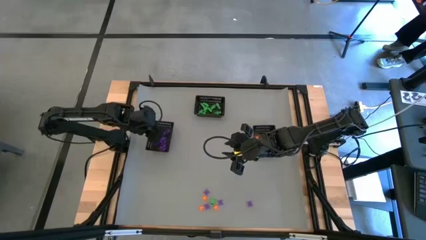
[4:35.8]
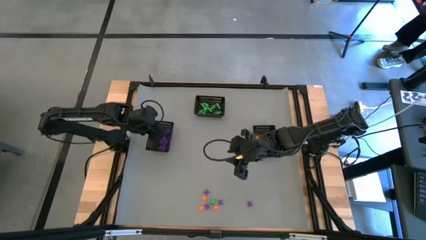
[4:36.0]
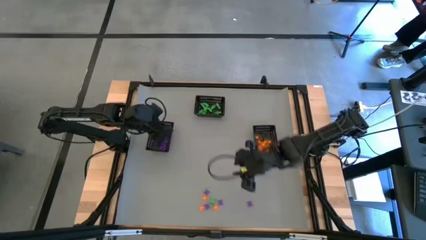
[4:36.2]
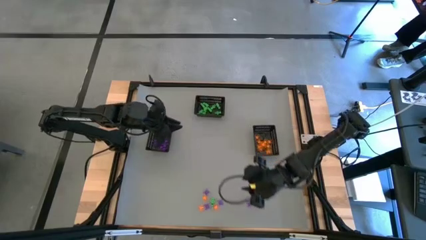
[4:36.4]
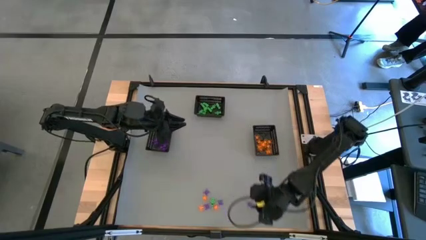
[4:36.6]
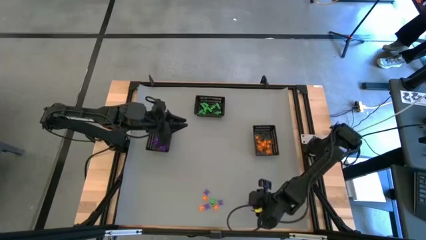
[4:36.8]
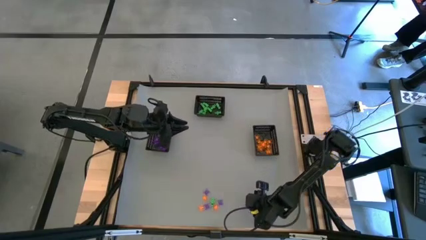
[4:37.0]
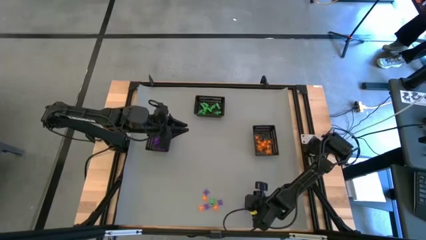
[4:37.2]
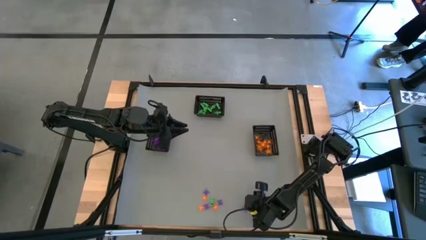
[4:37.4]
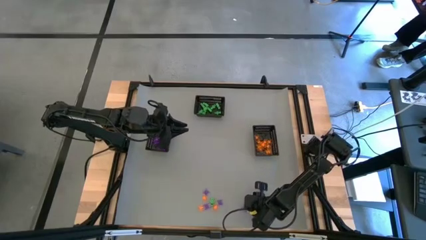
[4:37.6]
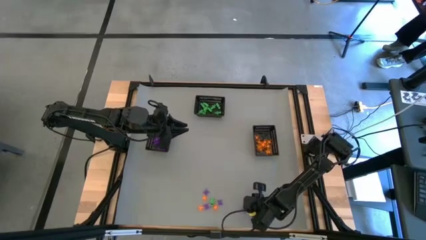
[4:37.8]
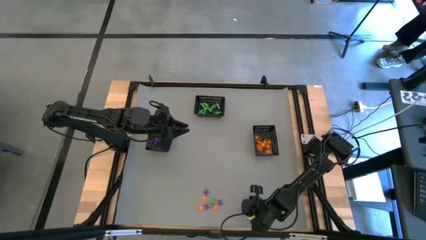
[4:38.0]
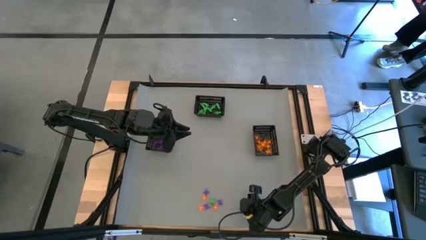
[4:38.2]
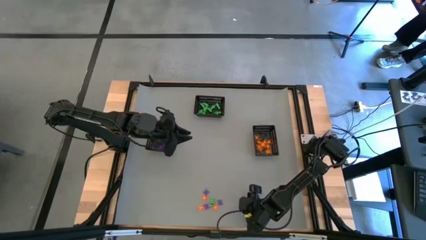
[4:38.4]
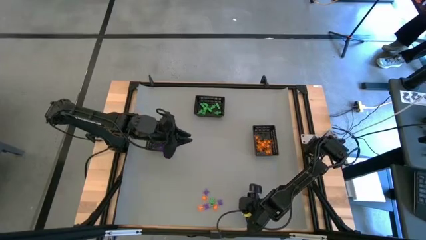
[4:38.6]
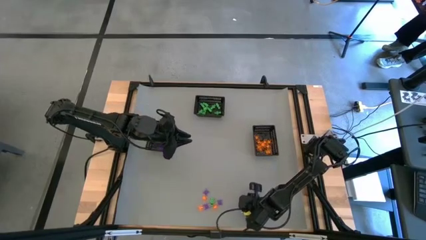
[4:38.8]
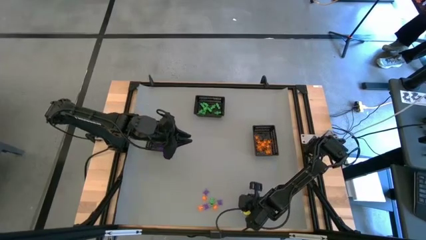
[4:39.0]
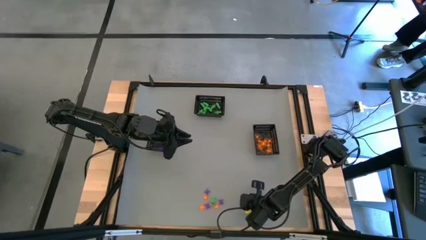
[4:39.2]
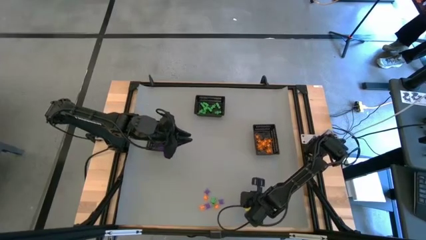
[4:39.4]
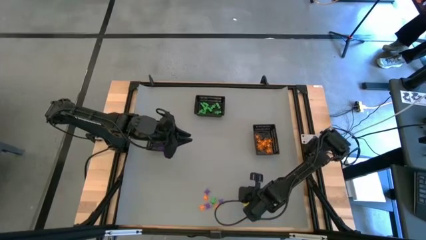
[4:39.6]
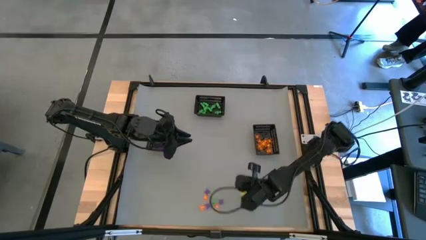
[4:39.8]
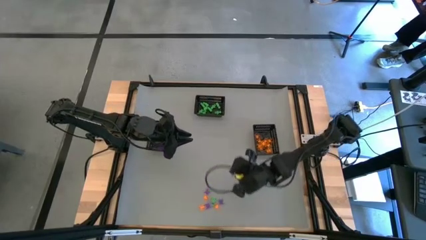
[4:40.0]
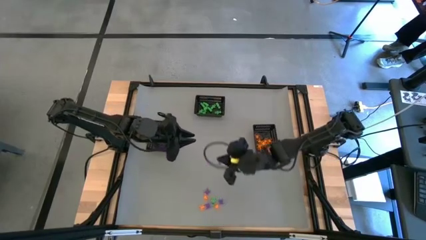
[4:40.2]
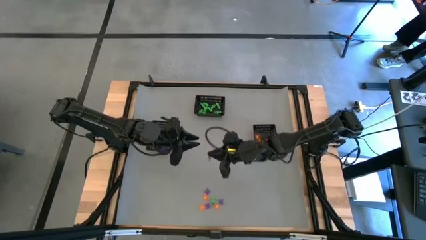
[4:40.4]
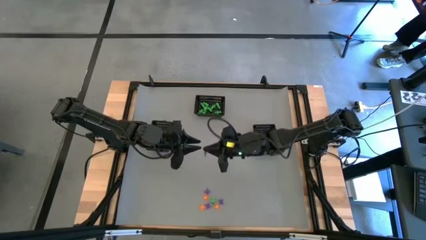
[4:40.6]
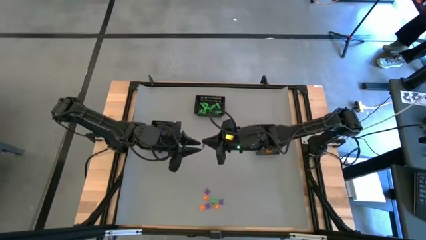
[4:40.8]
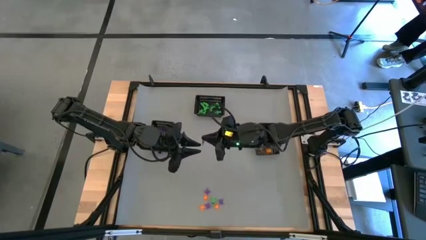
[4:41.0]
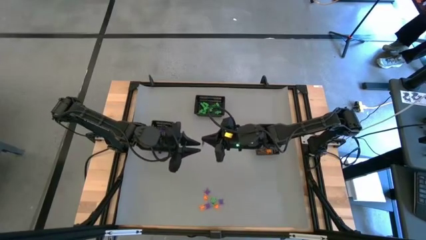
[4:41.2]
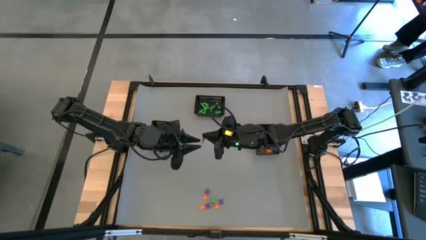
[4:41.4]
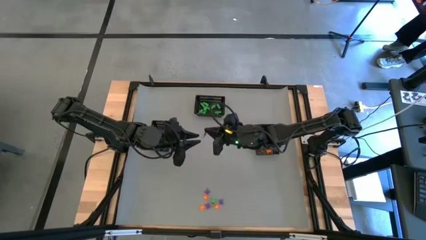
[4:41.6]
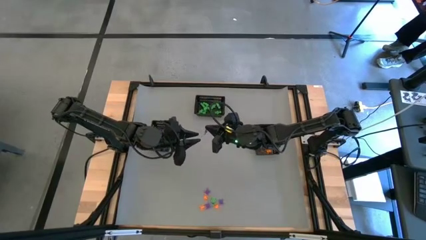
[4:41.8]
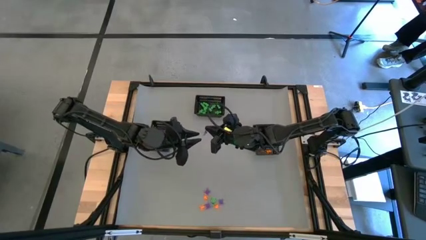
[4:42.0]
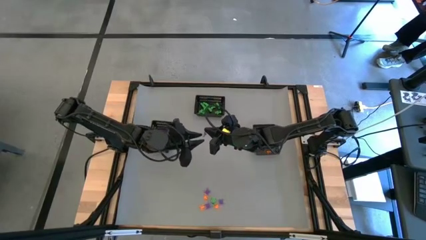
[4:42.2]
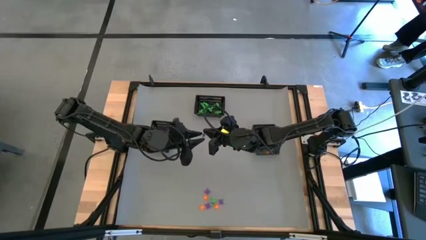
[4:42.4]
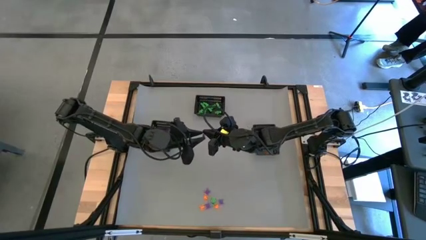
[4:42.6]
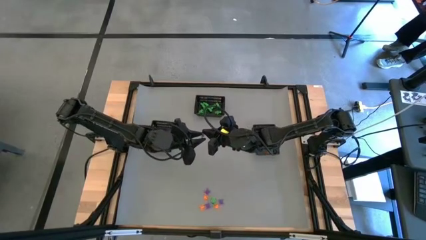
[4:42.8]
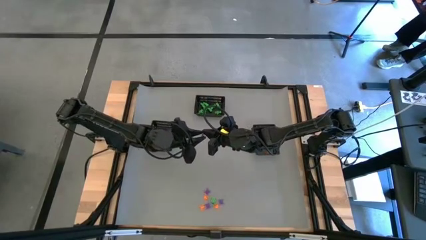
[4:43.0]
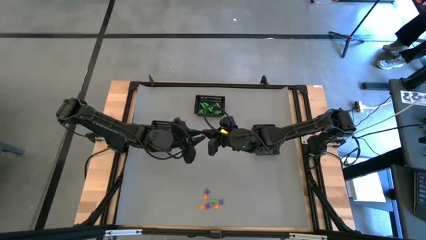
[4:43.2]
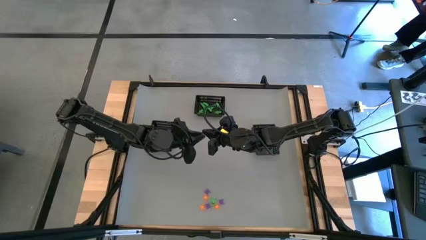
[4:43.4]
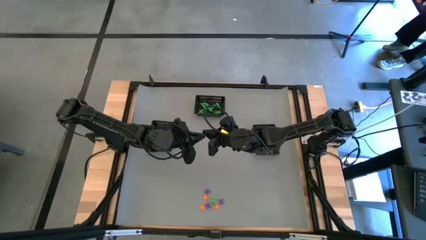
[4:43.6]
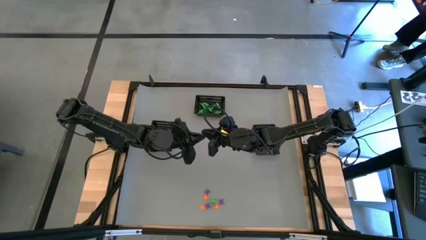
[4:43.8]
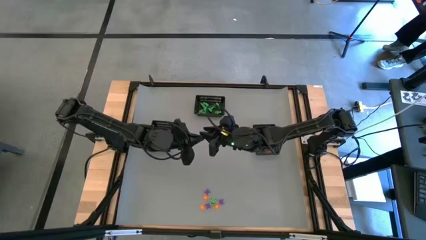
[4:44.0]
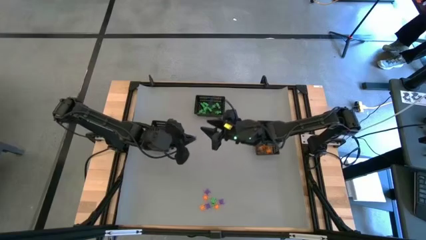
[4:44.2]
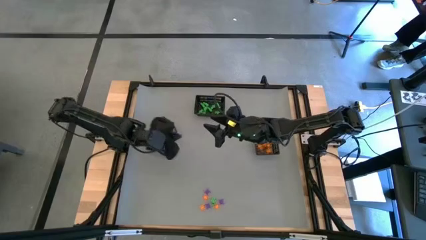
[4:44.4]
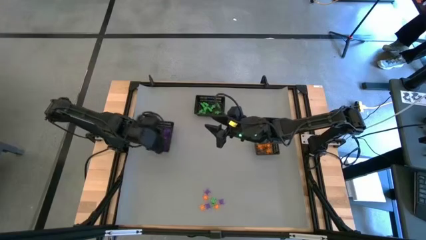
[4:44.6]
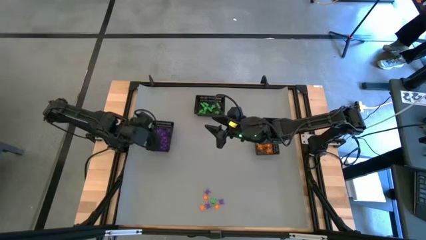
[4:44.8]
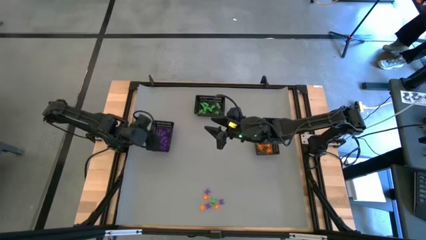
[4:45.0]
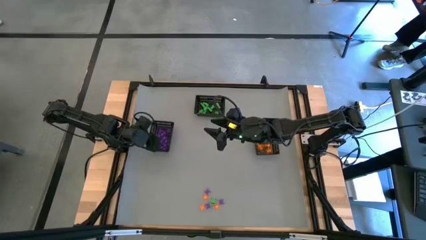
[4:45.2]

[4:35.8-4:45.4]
Task: Sort Halloween decoration
Put the violet spider toy into the left bin

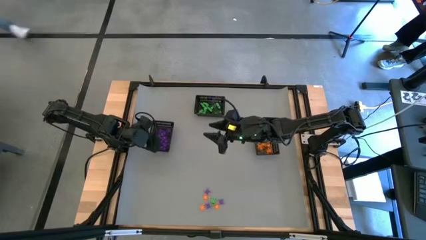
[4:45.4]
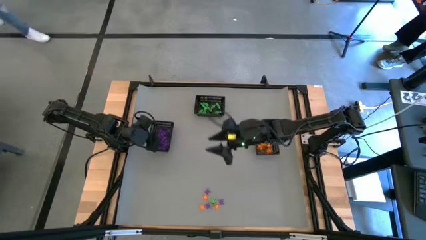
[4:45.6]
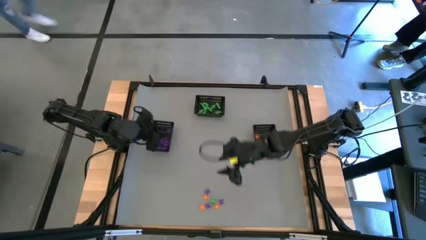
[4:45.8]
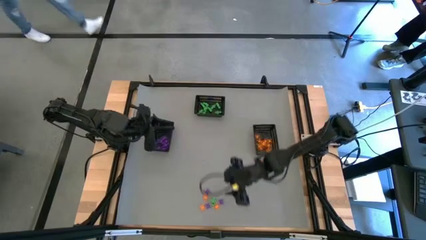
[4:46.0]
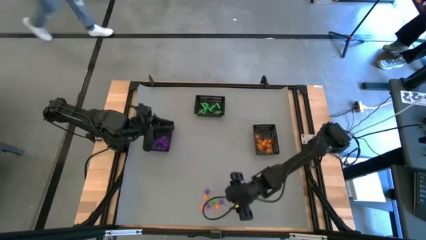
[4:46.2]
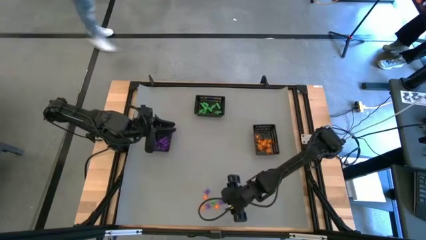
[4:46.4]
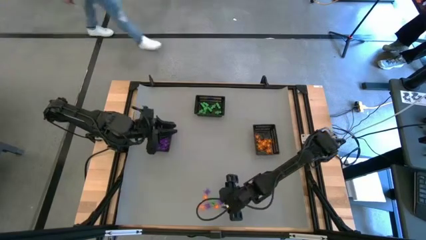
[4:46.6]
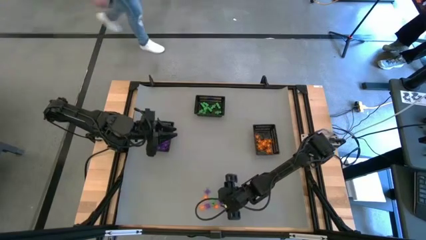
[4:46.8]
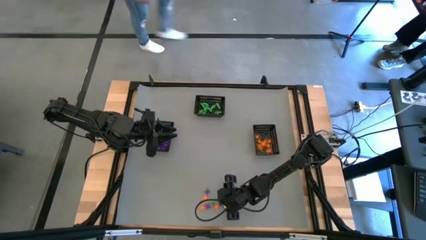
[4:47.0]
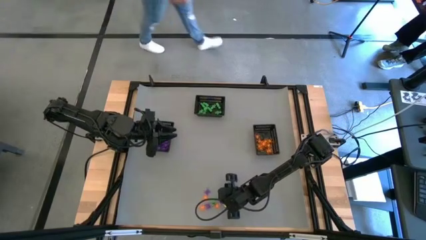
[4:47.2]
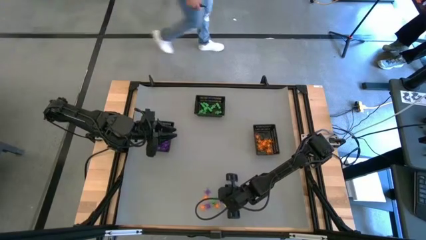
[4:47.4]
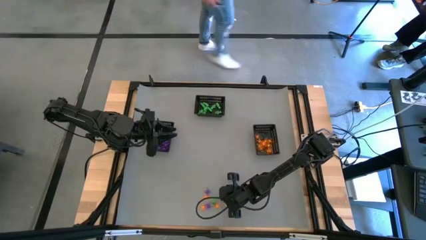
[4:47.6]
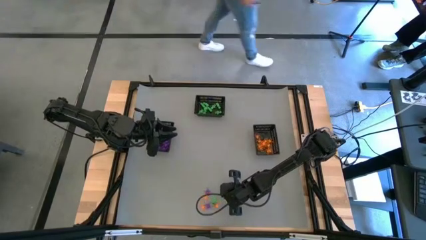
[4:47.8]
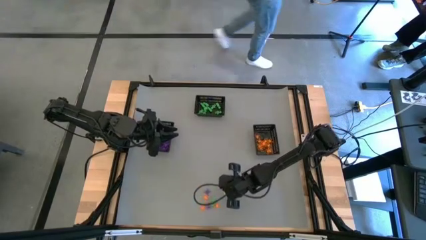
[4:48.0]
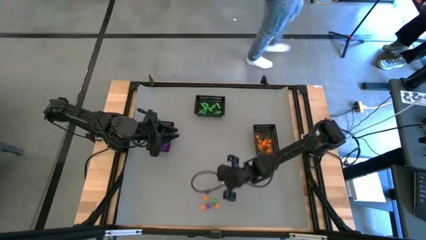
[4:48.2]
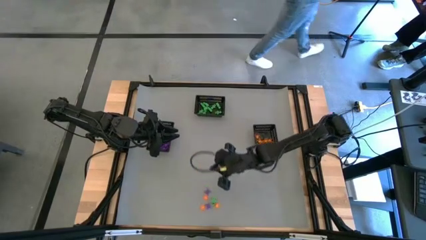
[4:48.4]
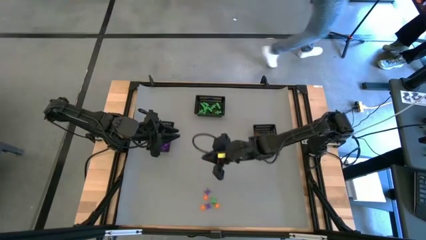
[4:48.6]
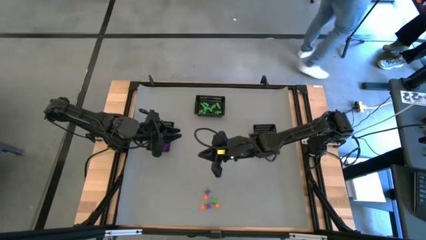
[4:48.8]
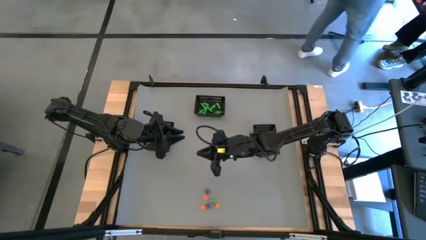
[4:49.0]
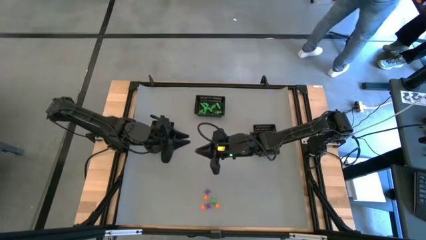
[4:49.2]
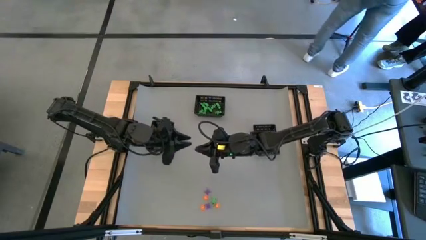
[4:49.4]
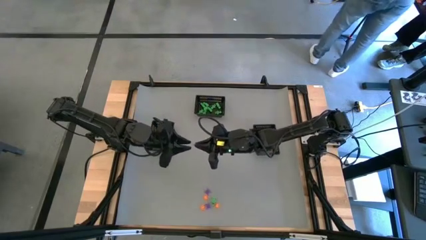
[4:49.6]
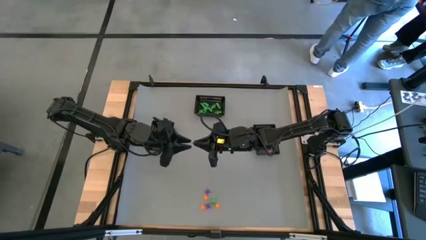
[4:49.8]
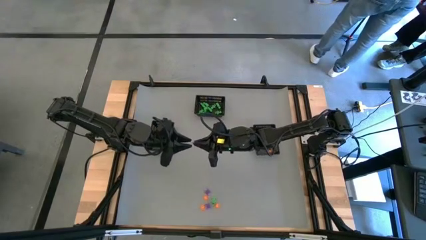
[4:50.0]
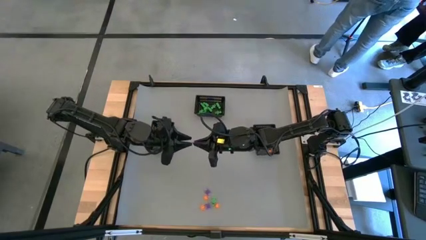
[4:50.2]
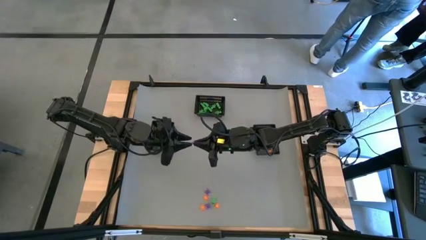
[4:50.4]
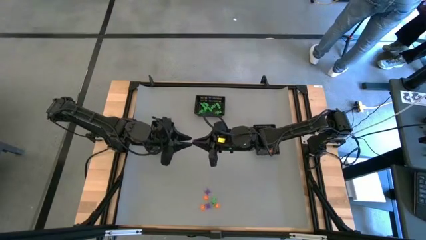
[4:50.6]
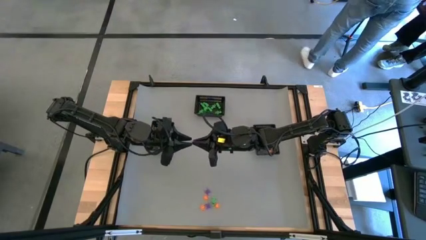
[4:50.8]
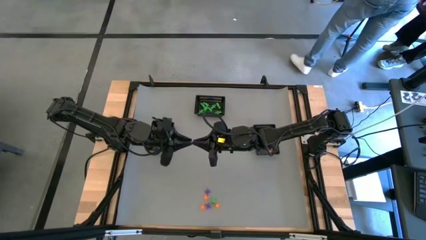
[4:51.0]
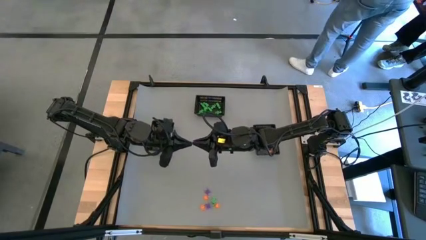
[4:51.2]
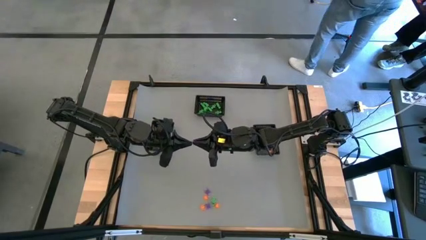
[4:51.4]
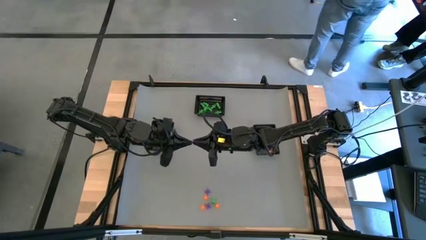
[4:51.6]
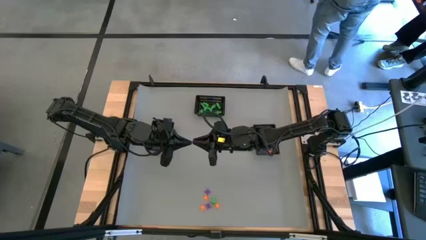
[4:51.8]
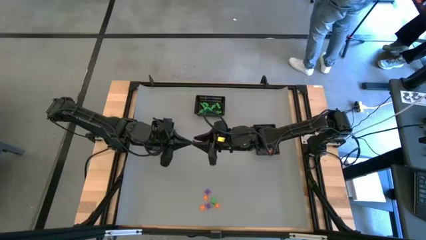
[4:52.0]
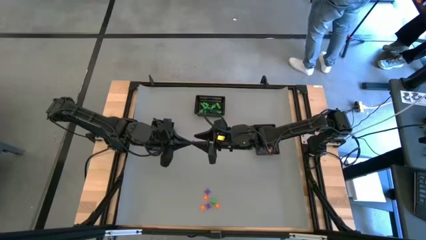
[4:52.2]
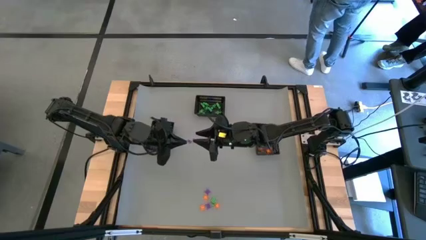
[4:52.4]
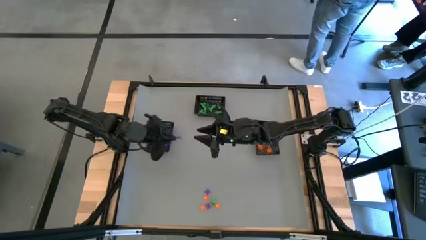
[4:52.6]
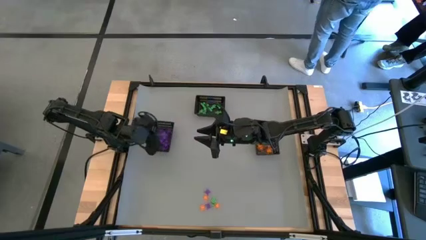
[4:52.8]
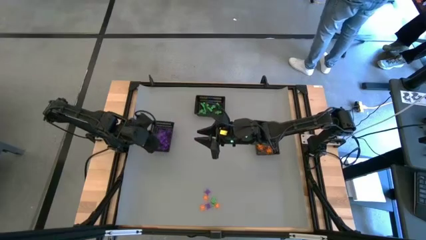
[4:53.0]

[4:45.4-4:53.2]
Put the bottom right violet spider toy into the left bin
